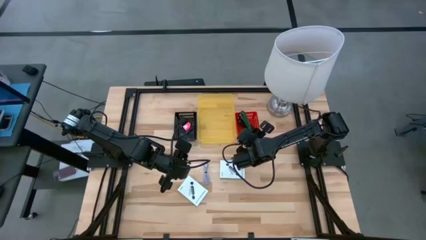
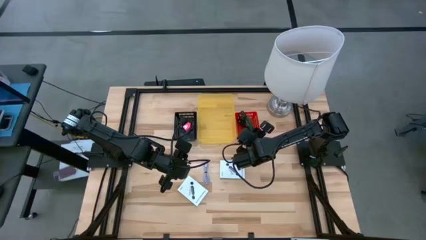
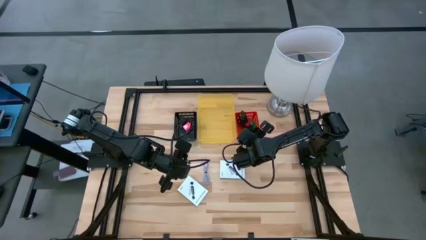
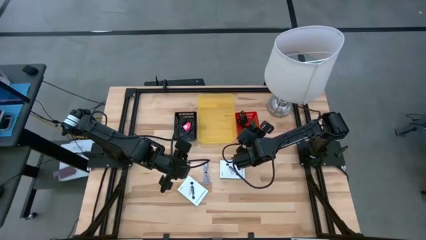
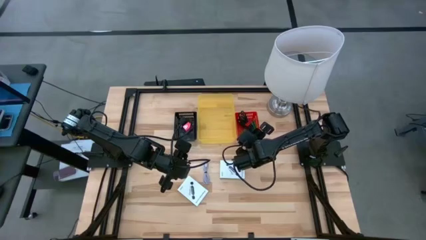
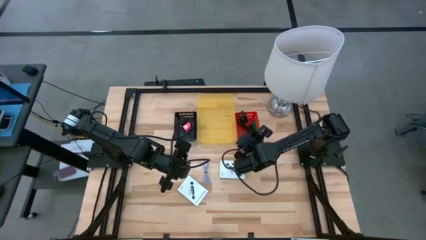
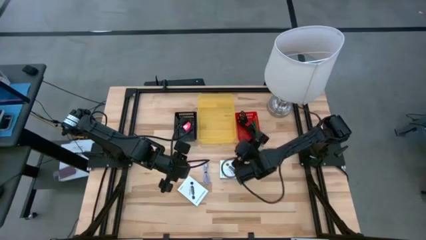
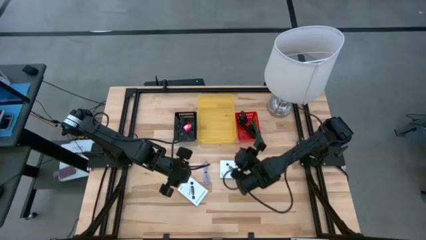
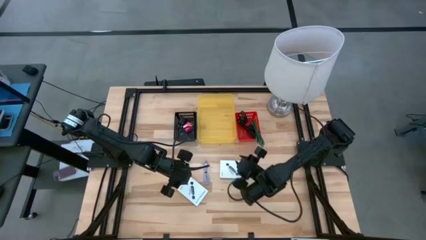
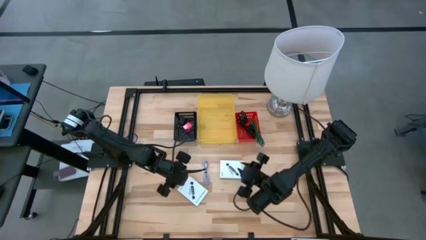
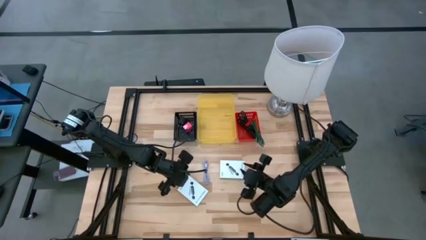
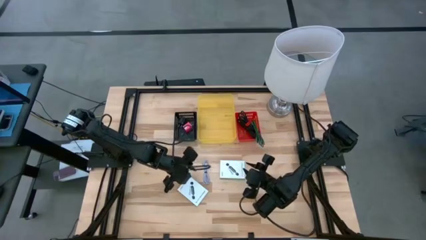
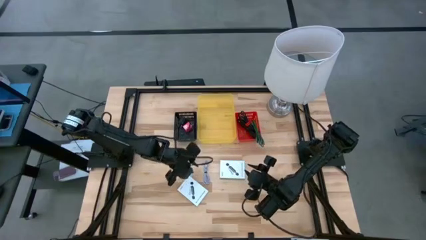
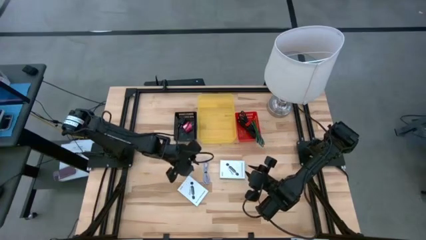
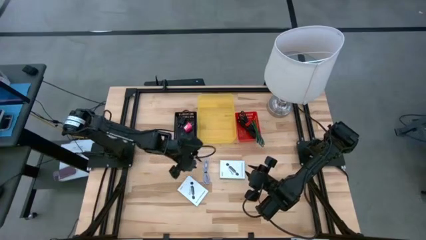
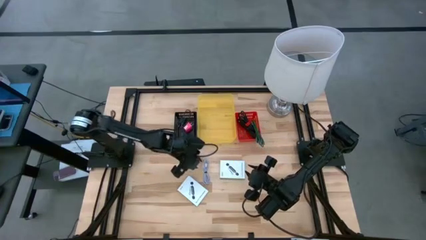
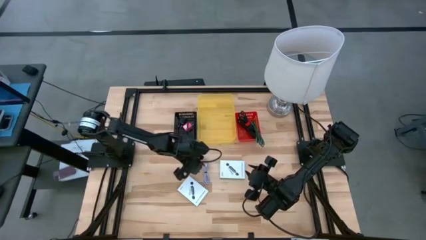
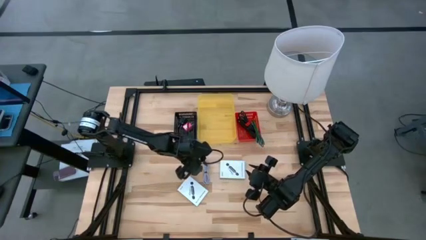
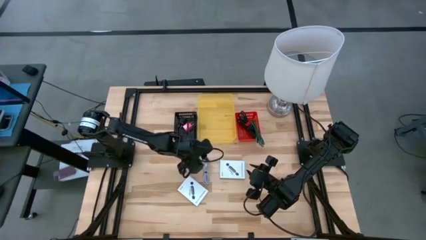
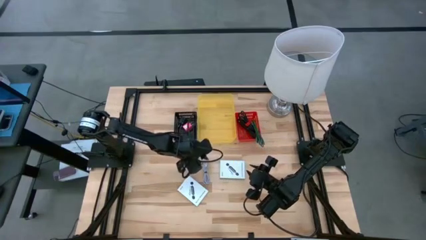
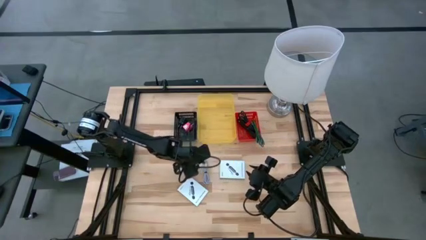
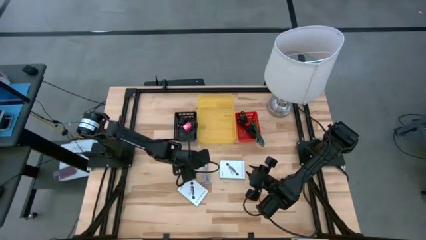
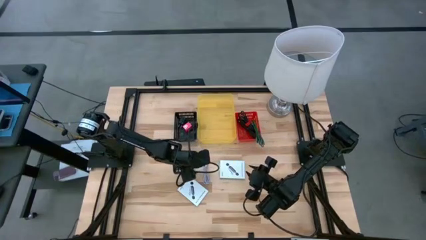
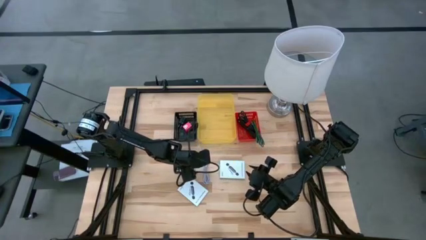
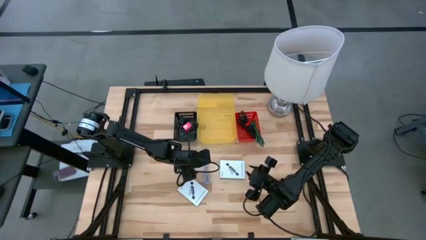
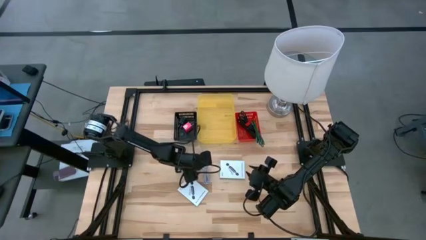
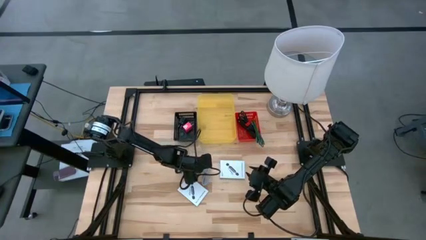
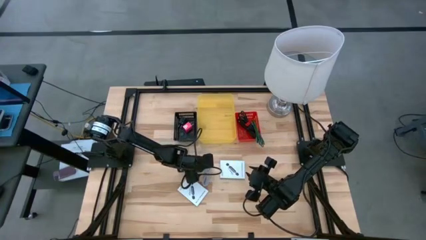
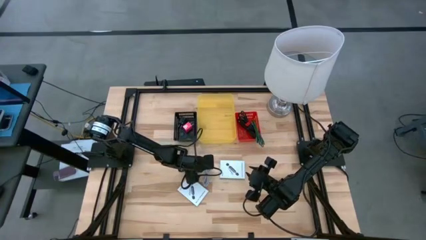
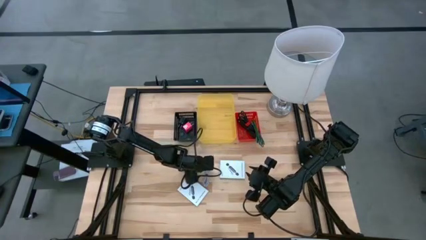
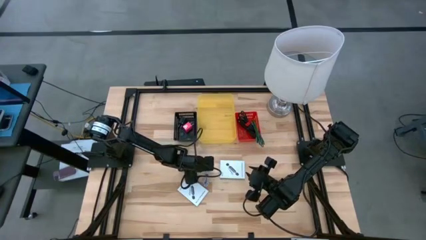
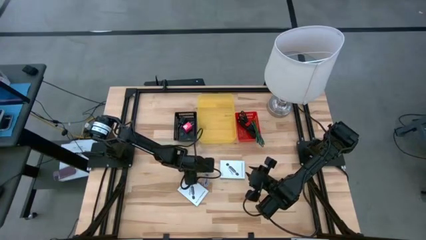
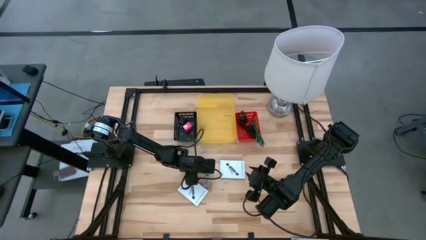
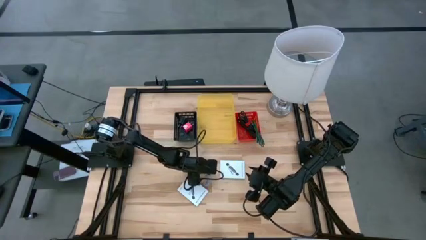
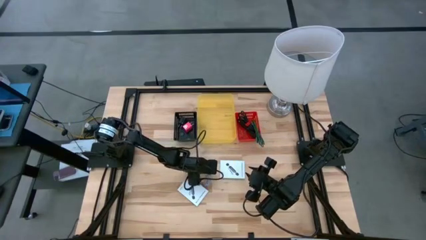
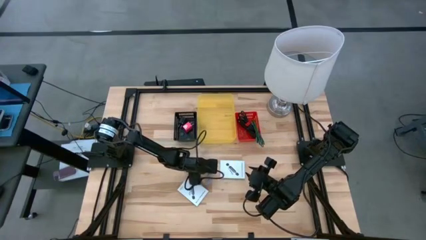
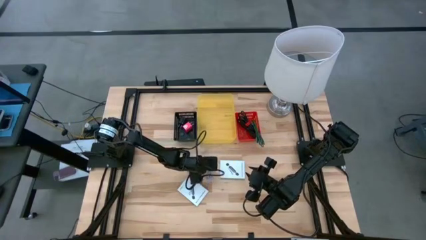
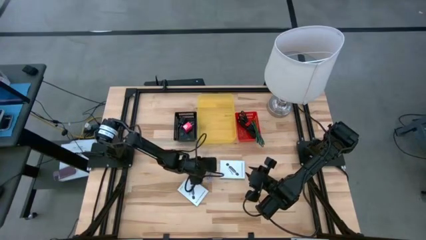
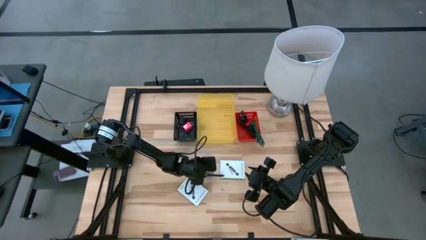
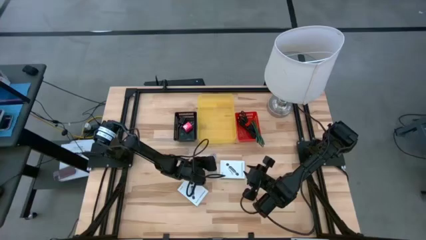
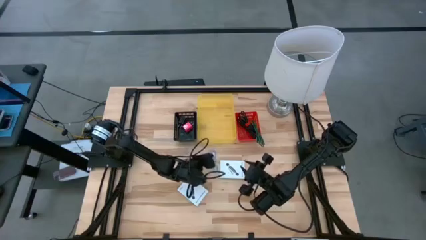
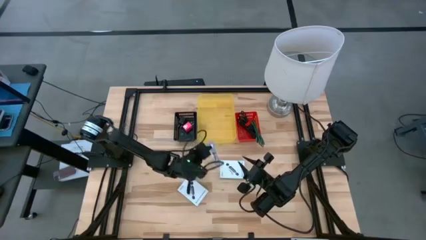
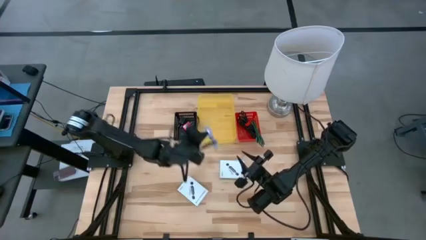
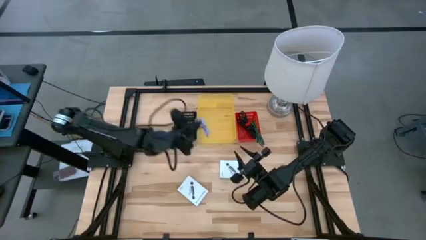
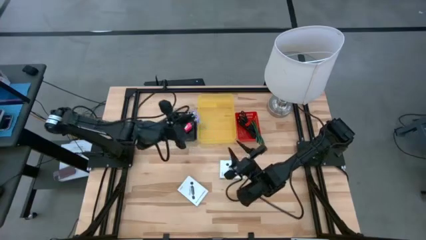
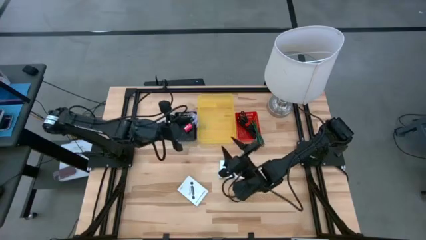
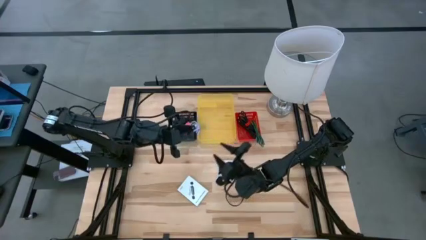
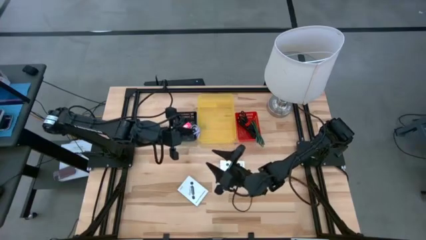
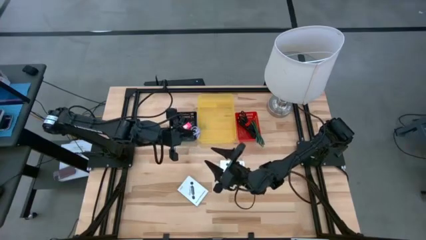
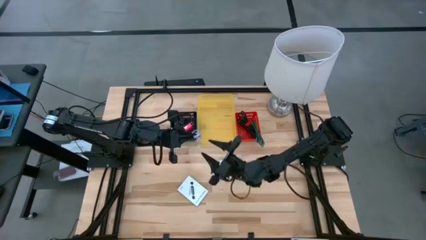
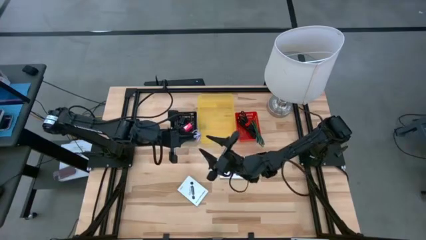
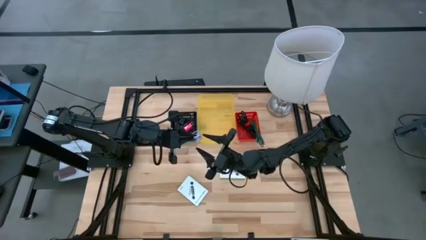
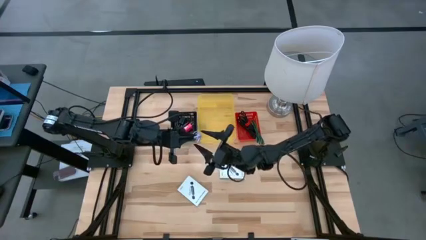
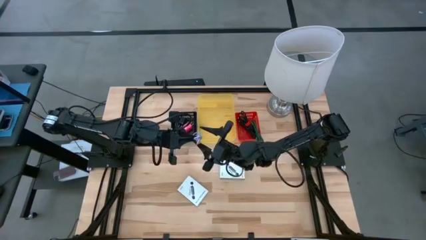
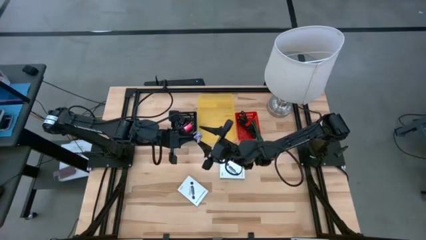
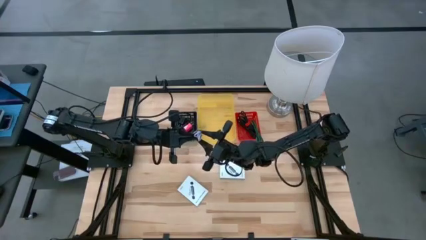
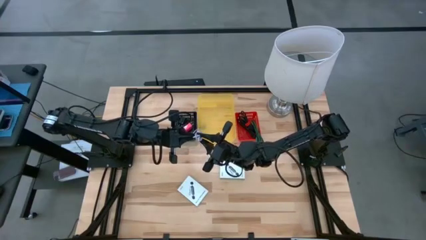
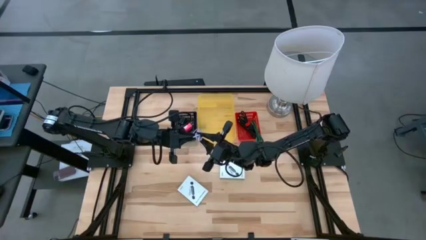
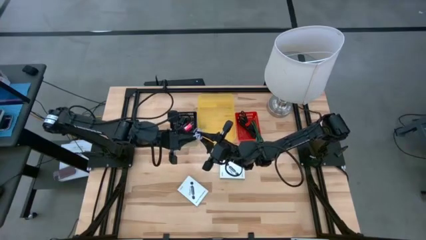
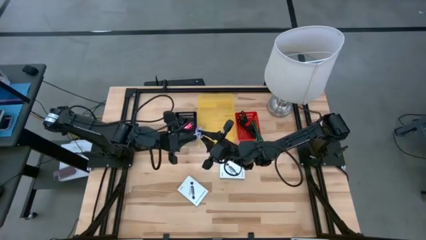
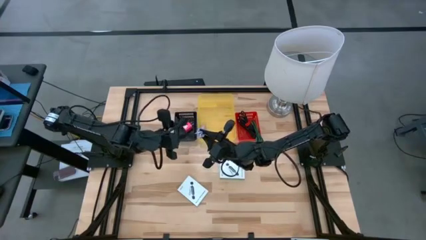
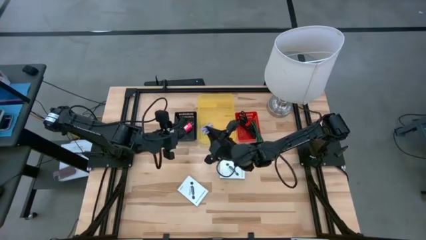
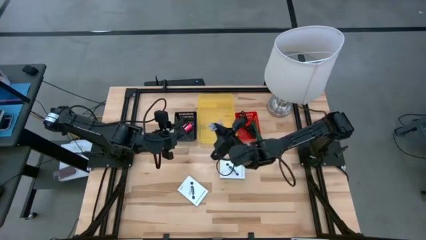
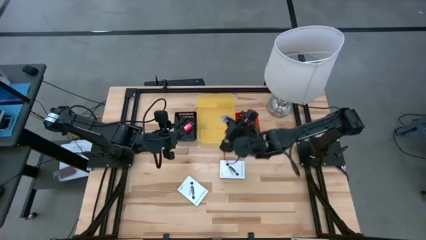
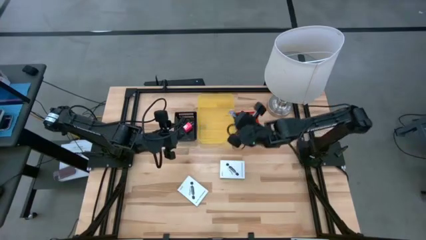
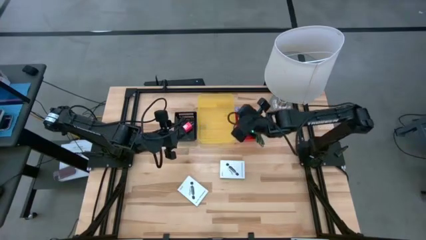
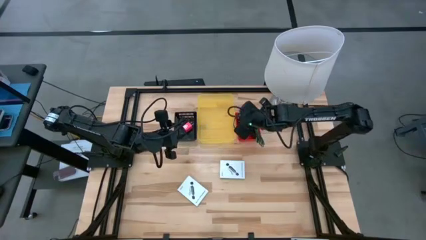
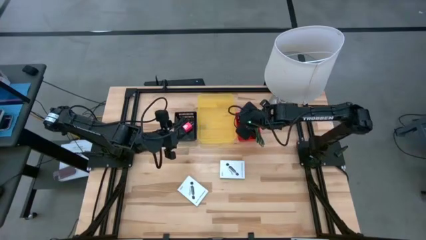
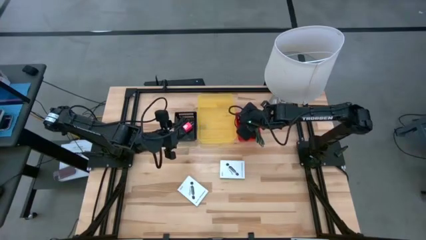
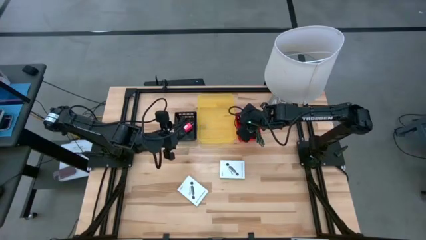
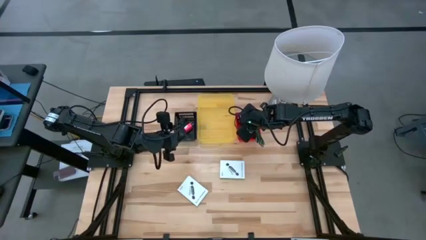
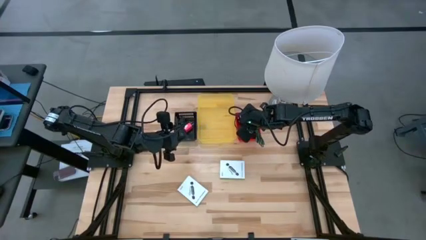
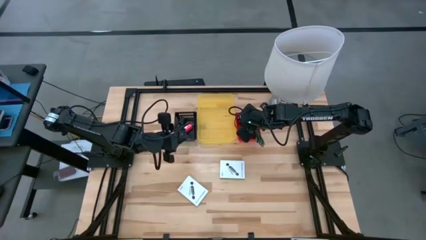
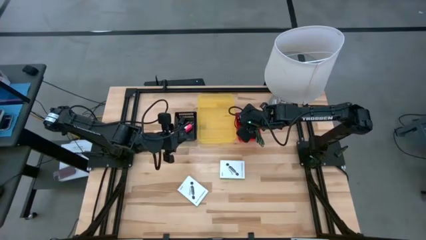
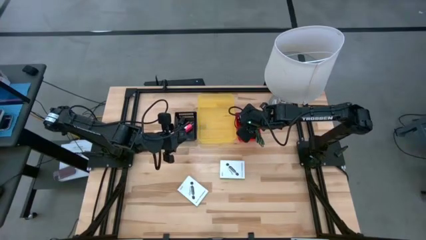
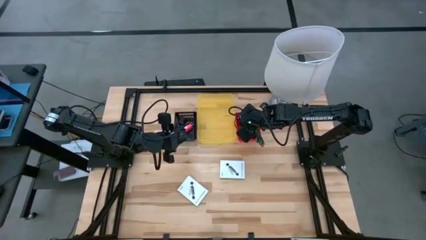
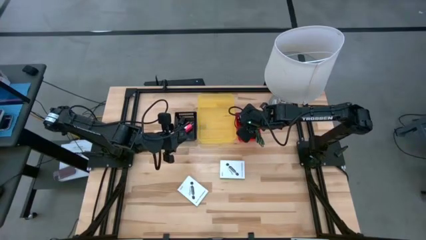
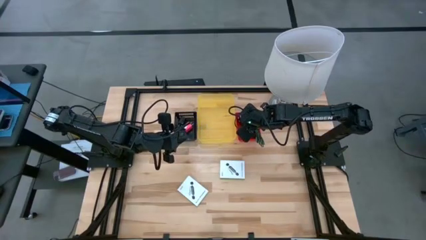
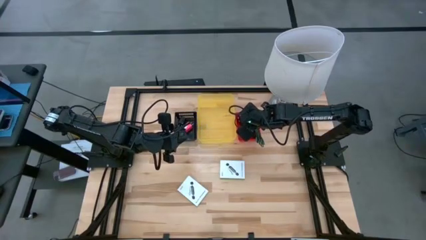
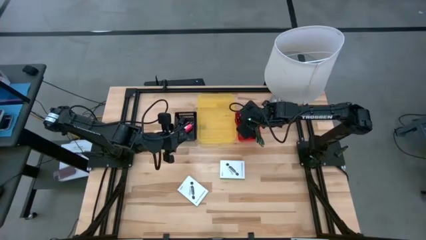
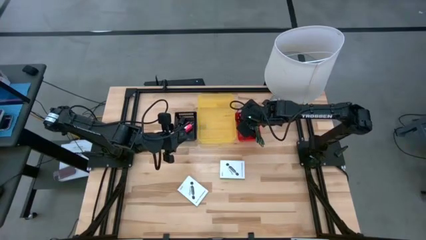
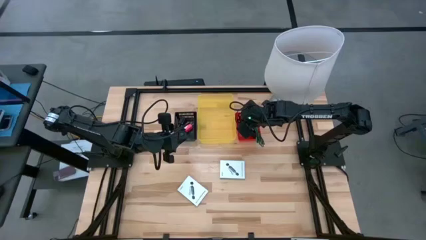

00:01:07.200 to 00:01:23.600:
Task: Pick and place items into bin
Put the gray charger cable into the red bin
